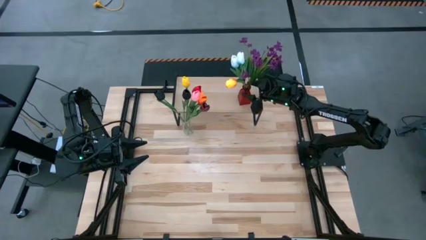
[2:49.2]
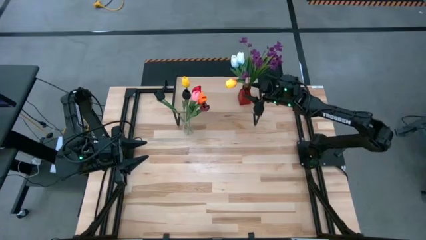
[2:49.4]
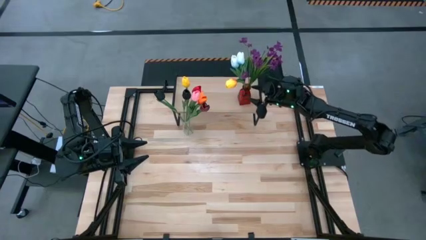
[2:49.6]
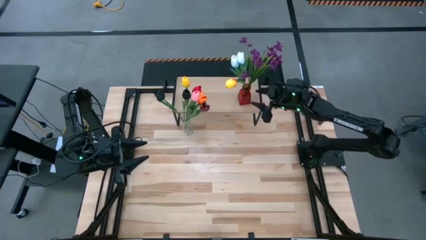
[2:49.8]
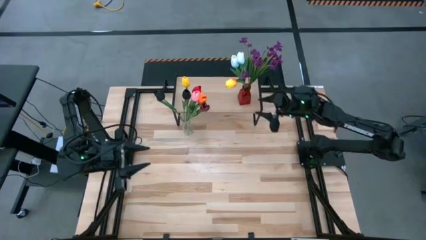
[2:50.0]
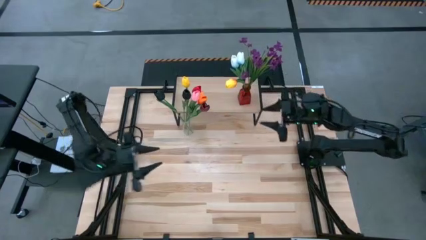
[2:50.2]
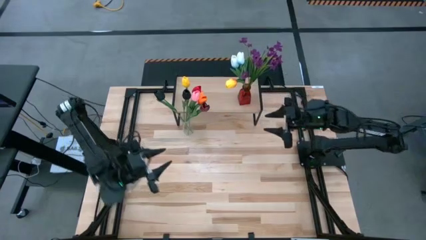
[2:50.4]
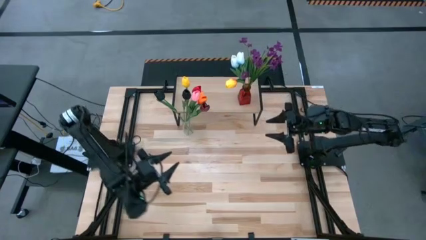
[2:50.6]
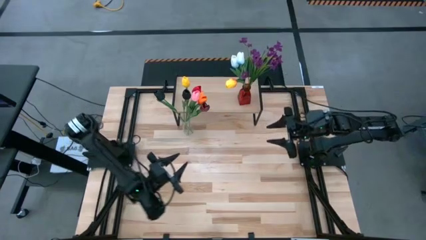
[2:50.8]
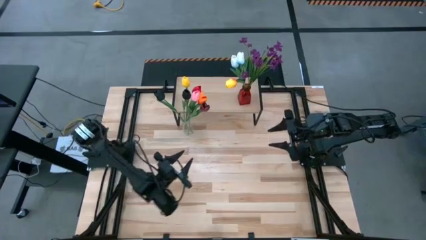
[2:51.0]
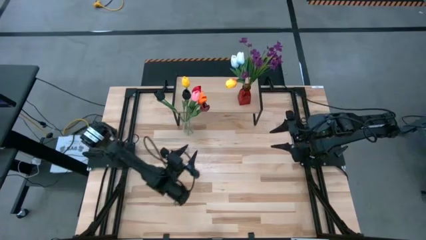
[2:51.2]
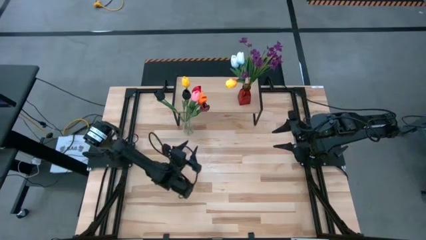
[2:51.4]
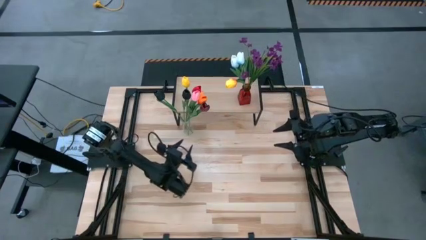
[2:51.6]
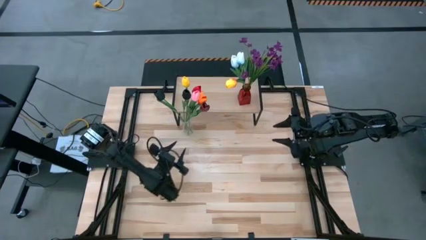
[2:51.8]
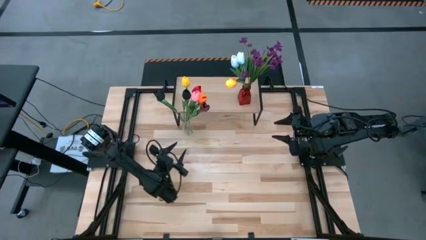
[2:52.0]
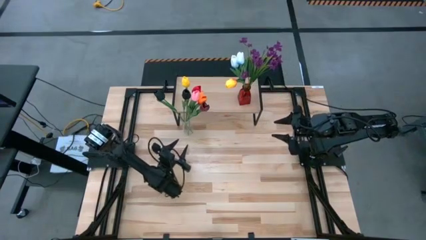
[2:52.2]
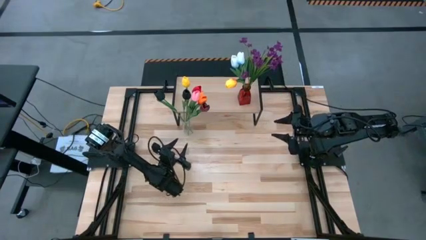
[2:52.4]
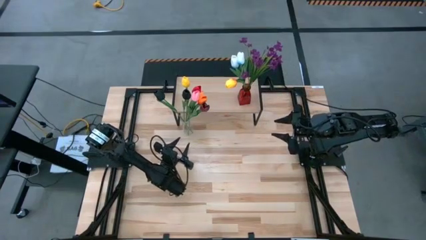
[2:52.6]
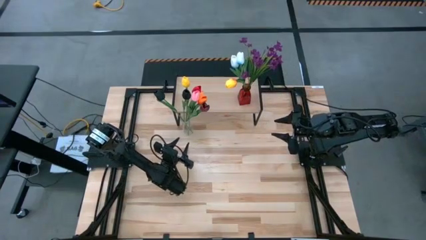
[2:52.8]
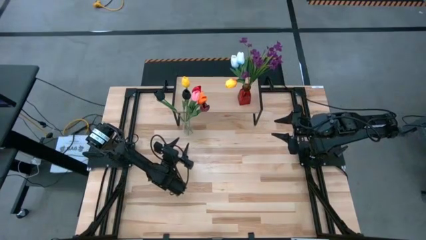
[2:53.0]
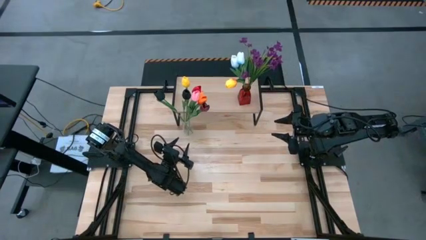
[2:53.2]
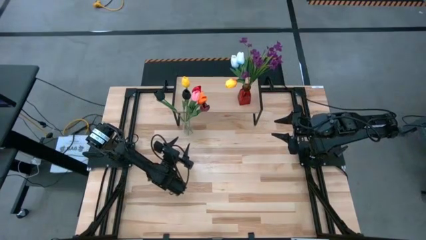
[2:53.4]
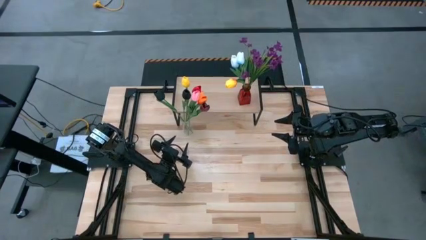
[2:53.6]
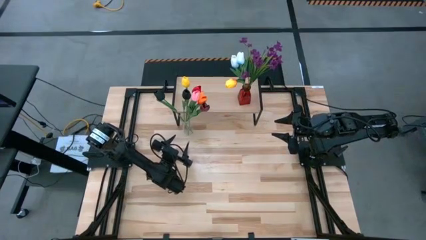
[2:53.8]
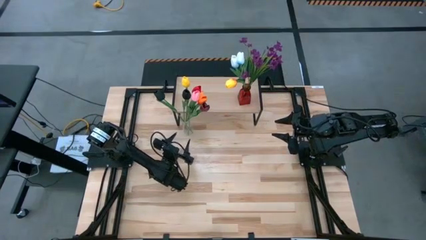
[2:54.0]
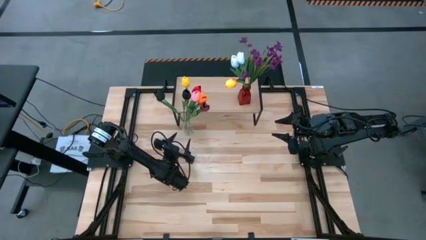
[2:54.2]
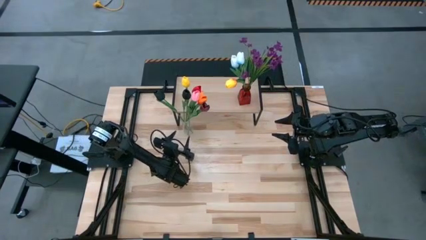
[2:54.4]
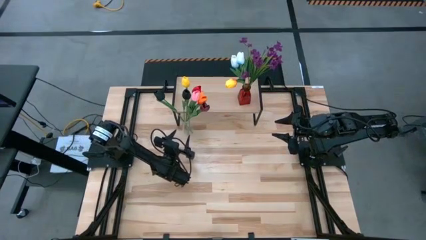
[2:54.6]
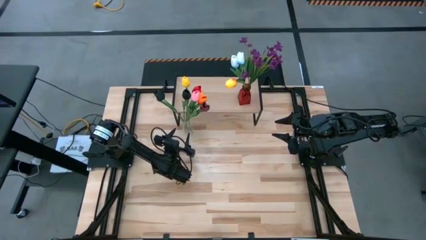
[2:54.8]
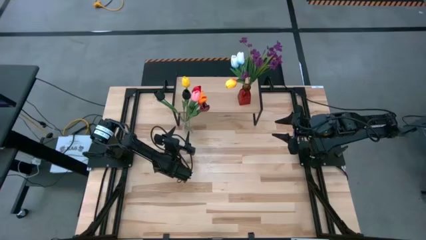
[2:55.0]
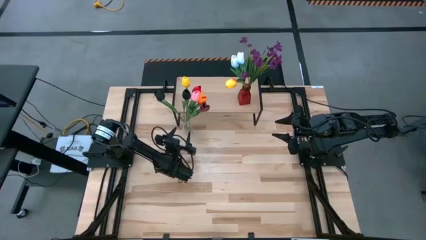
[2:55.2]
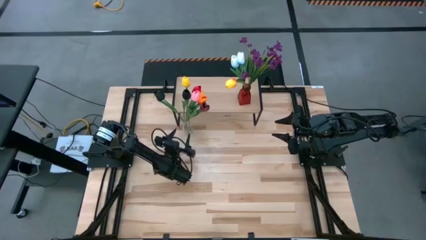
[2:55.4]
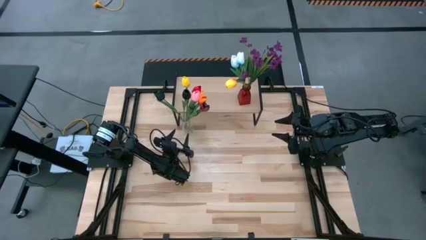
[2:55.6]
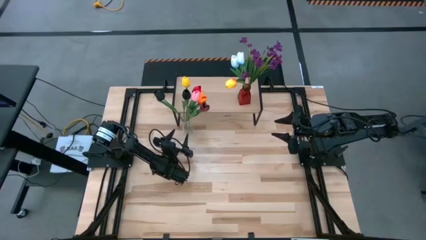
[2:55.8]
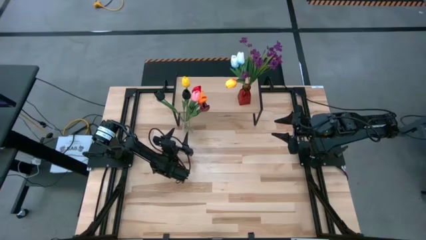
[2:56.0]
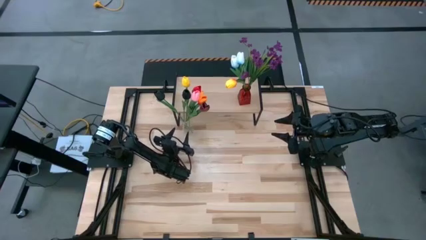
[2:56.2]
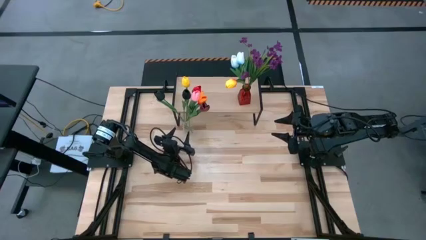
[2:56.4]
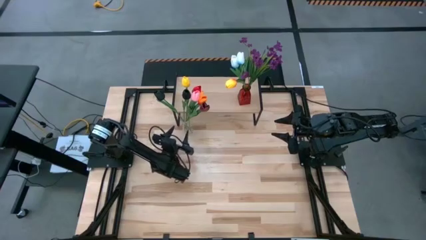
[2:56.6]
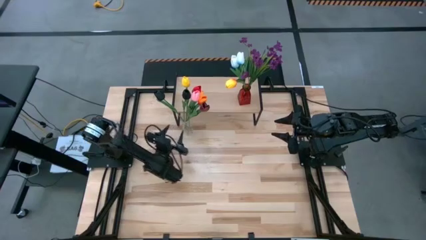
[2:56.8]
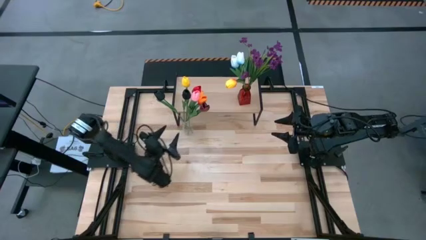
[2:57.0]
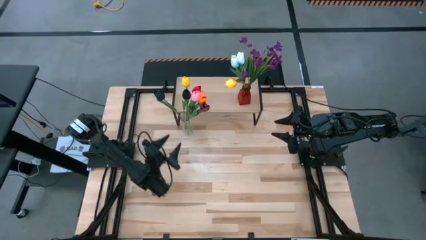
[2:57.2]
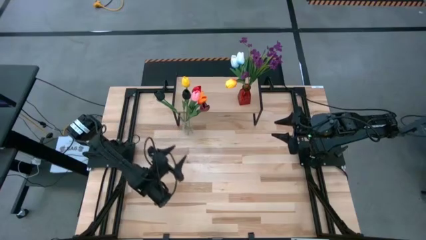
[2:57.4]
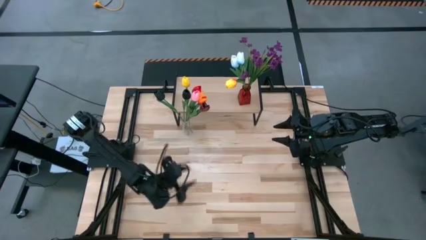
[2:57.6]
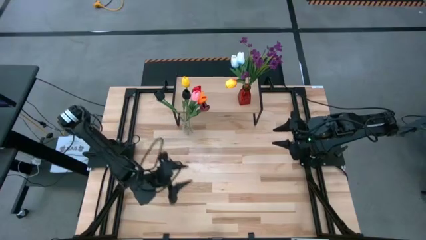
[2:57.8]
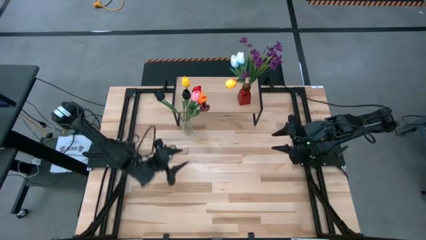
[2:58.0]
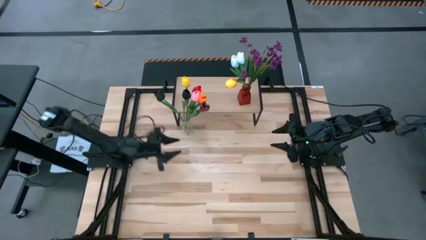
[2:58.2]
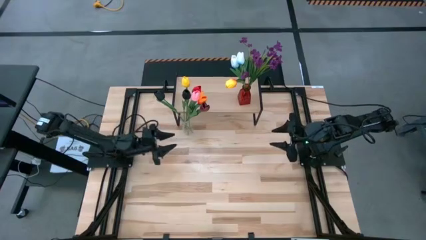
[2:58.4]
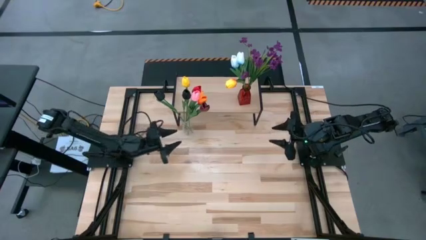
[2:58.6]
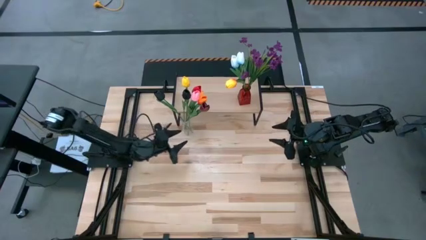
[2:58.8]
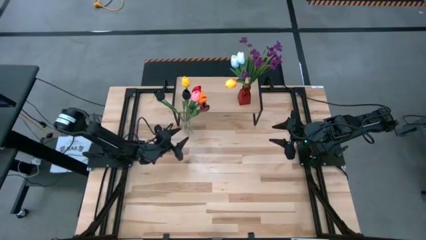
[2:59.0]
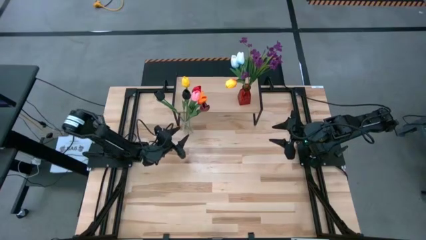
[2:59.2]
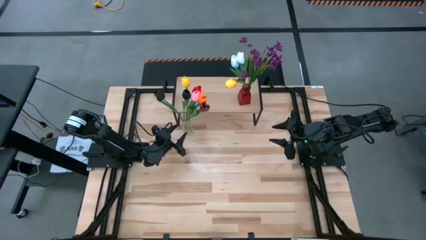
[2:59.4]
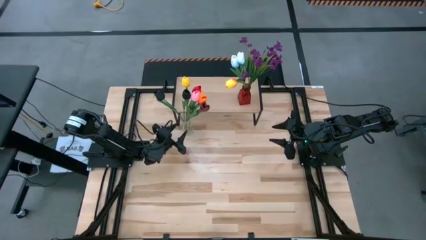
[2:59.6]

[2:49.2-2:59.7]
Task: Pick and place flowers into a vace then onto a shelf
Put the transparent vase on the shelf

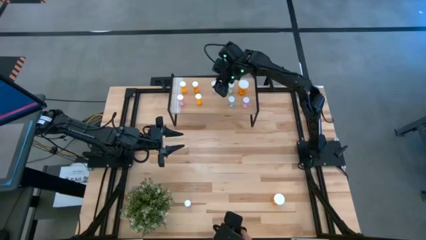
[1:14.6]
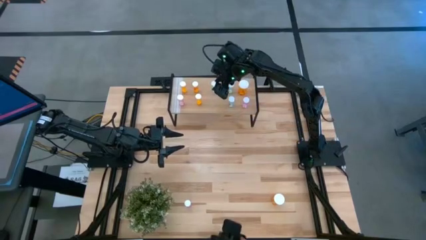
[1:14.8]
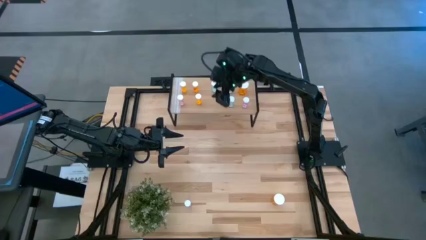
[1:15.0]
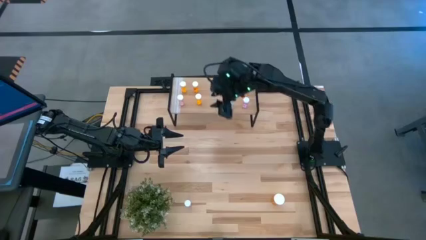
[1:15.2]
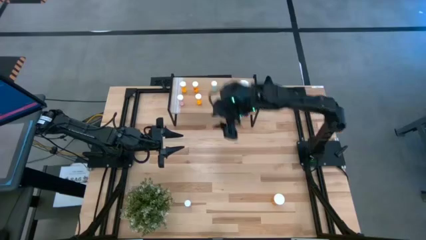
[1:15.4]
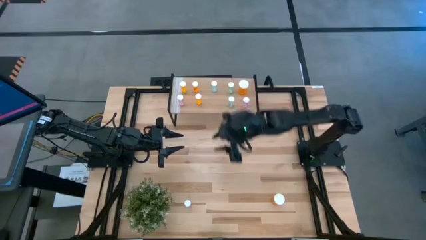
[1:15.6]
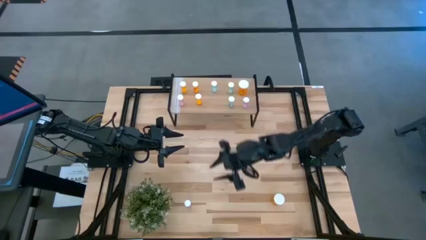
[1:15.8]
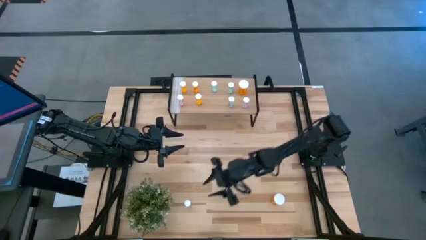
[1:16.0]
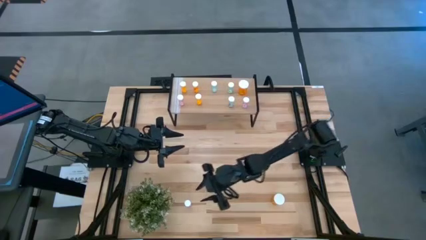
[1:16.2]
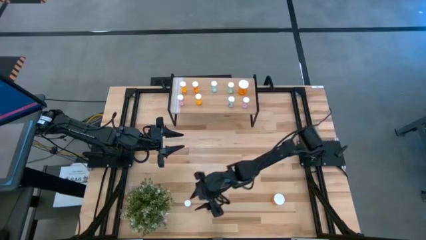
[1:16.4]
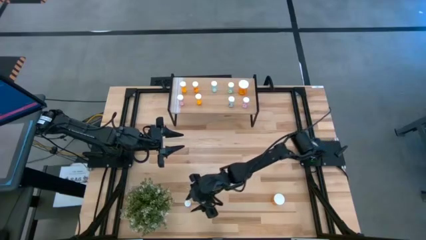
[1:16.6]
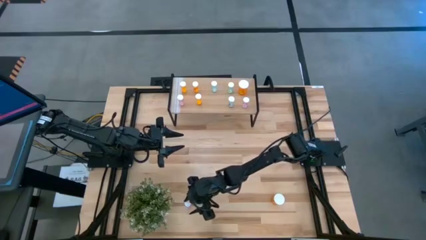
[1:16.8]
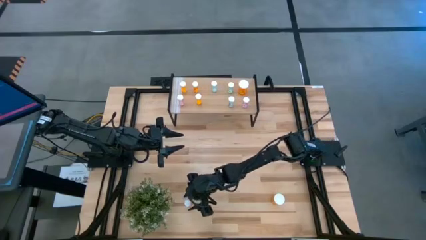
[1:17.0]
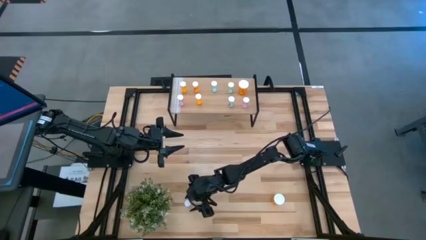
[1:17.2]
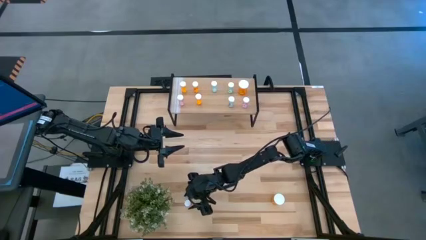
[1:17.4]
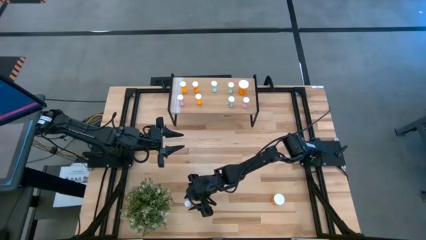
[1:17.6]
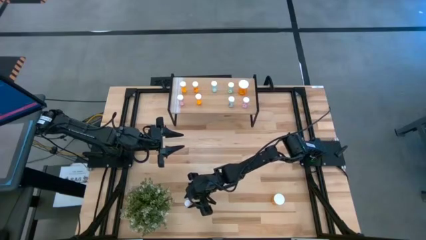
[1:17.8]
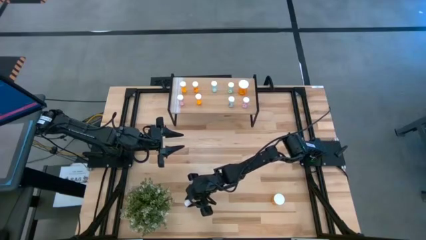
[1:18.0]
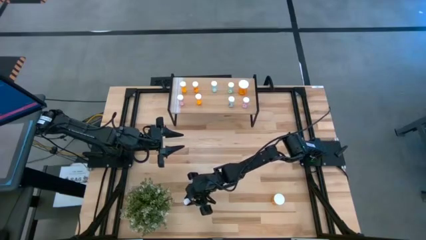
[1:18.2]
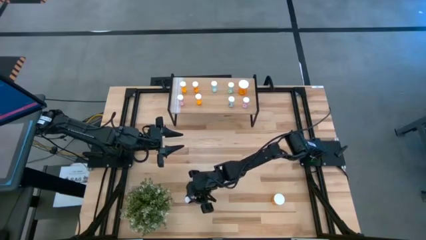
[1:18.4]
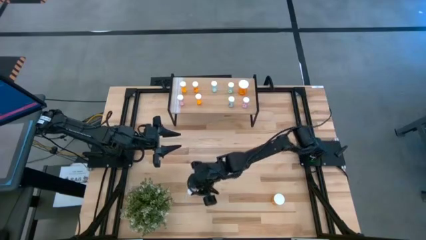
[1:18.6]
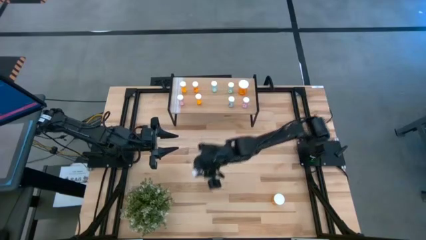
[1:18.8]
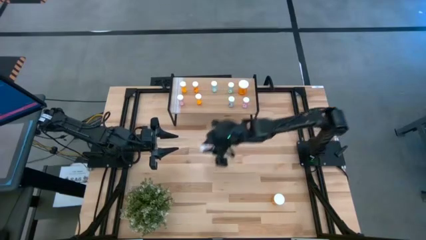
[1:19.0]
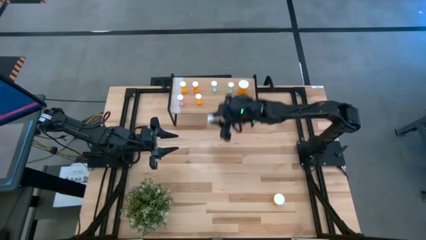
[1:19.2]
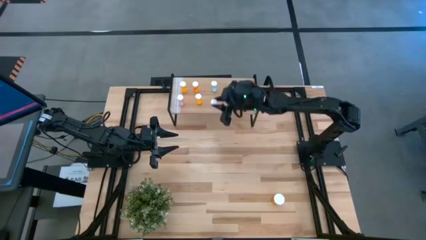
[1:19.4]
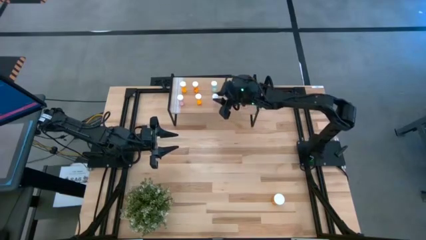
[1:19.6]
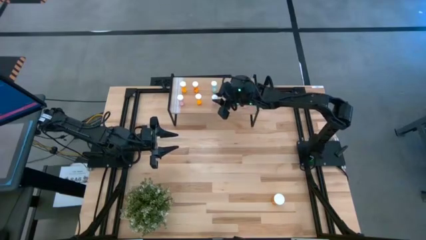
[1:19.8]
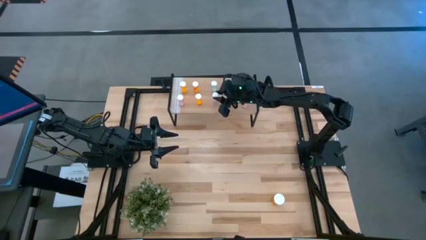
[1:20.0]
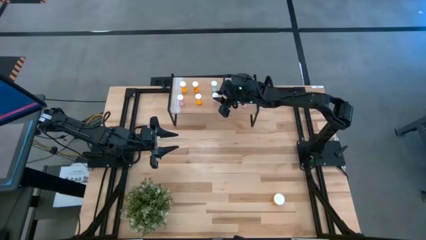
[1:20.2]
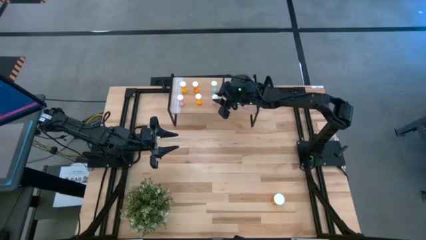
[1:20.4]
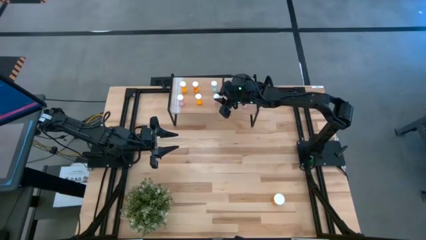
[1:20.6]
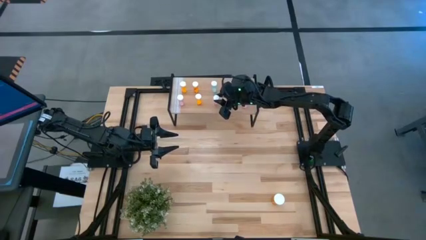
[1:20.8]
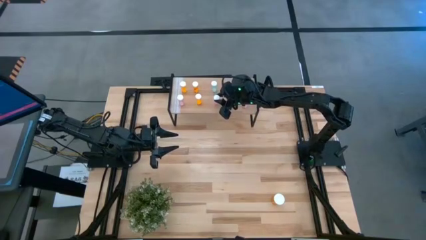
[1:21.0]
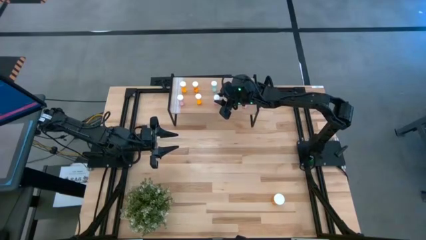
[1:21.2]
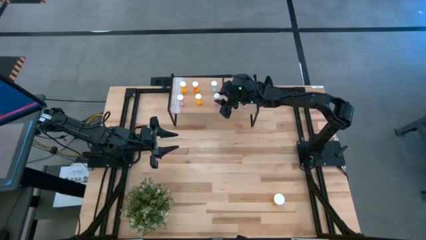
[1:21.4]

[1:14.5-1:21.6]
Task: Pick and place medicine bottles onto shelf by color
Put the small pink pill bottle on the shelf
